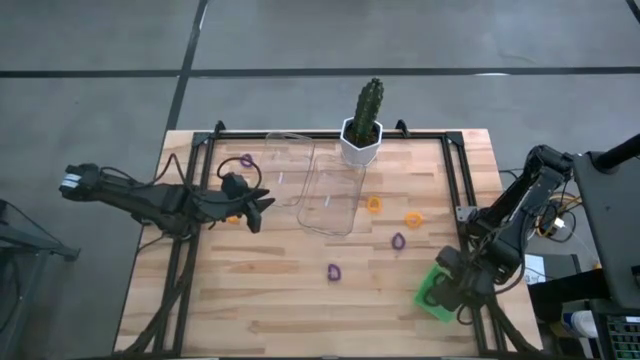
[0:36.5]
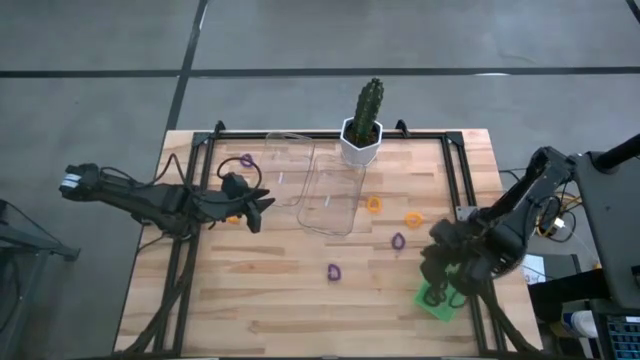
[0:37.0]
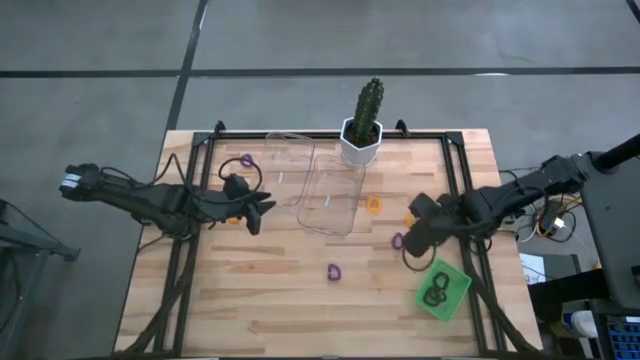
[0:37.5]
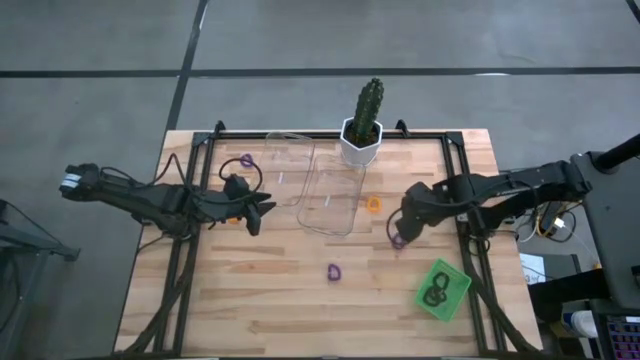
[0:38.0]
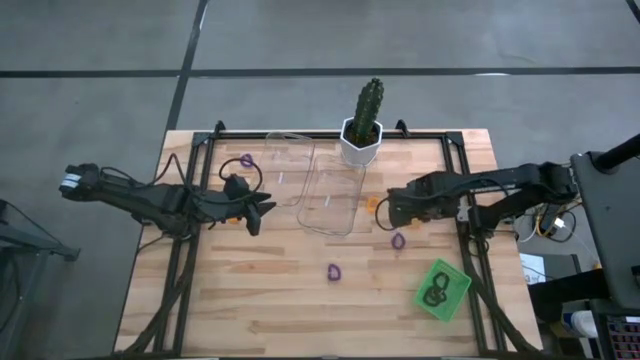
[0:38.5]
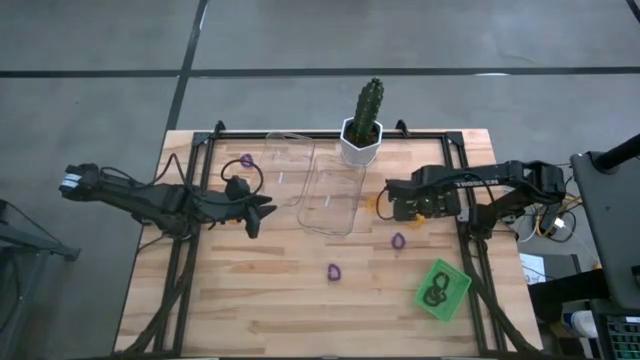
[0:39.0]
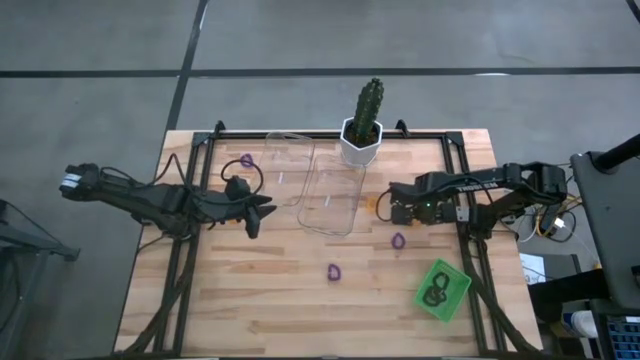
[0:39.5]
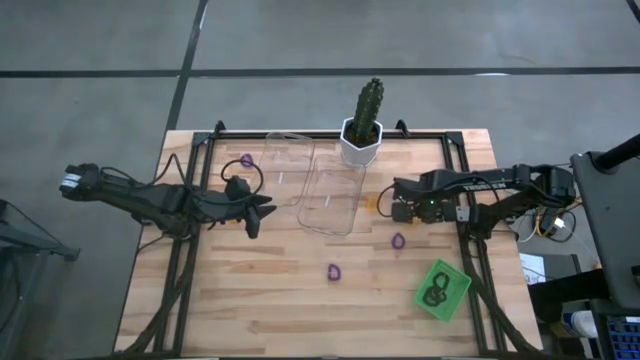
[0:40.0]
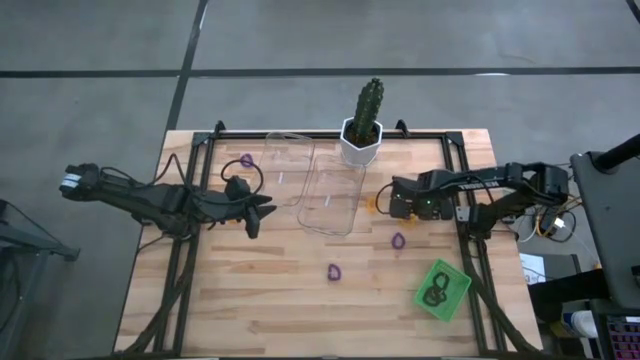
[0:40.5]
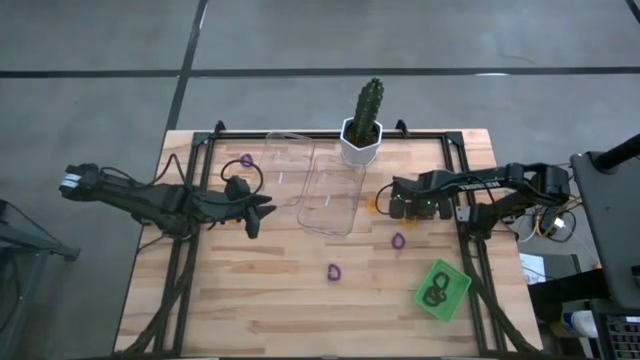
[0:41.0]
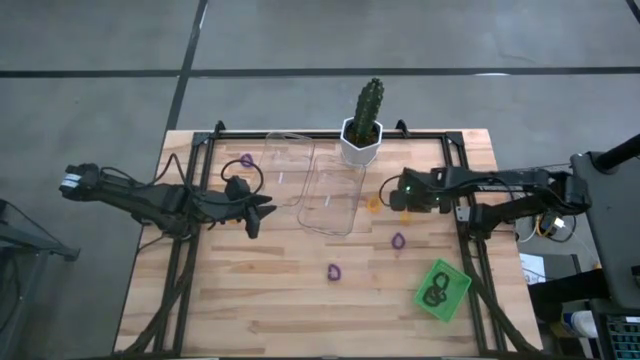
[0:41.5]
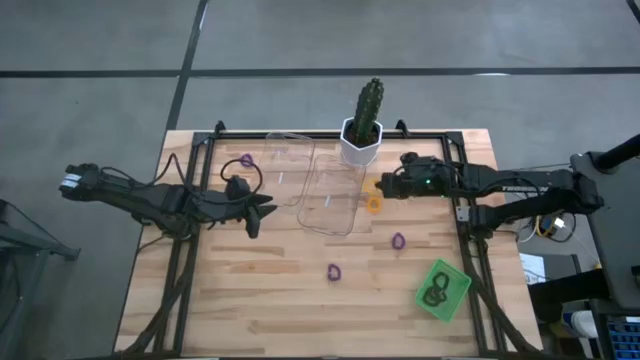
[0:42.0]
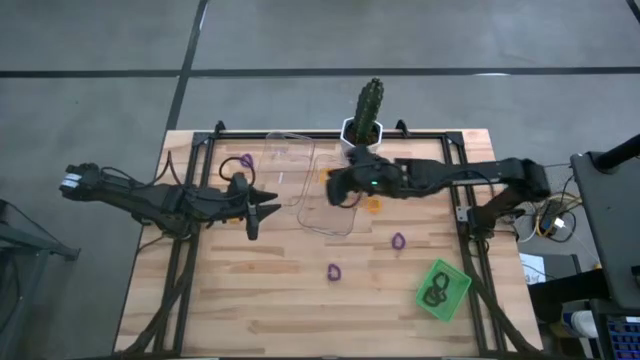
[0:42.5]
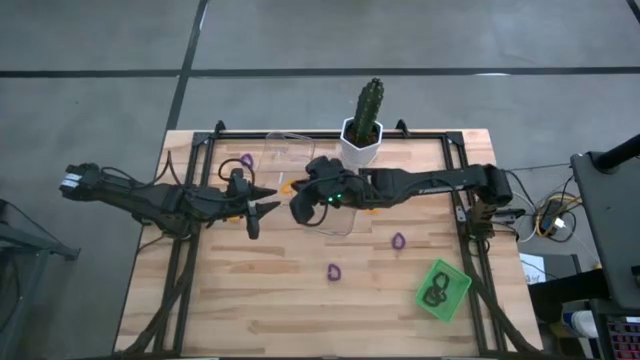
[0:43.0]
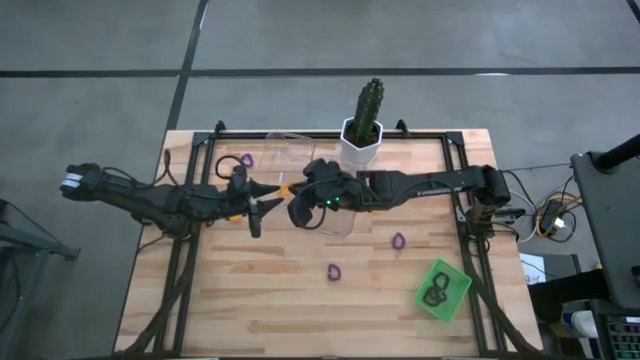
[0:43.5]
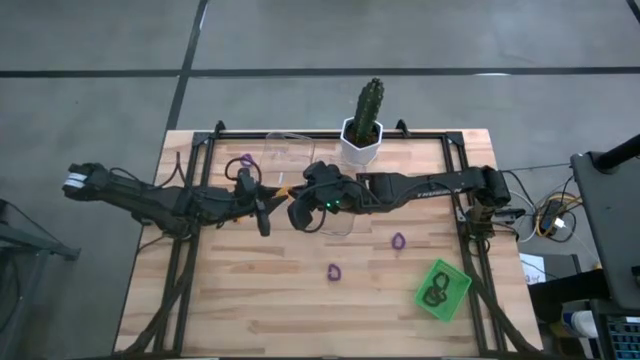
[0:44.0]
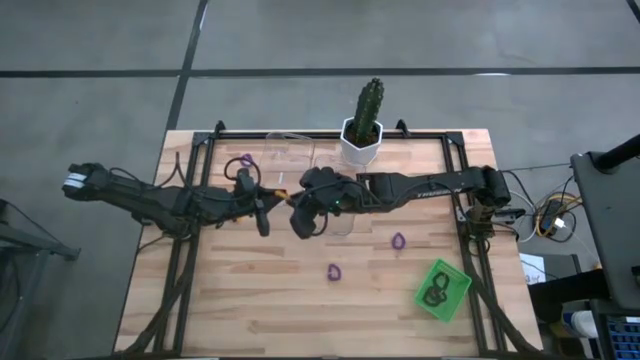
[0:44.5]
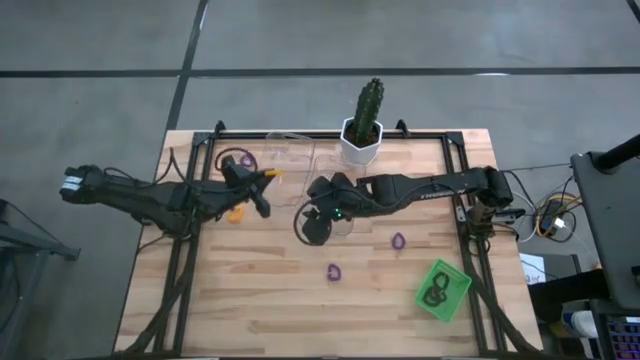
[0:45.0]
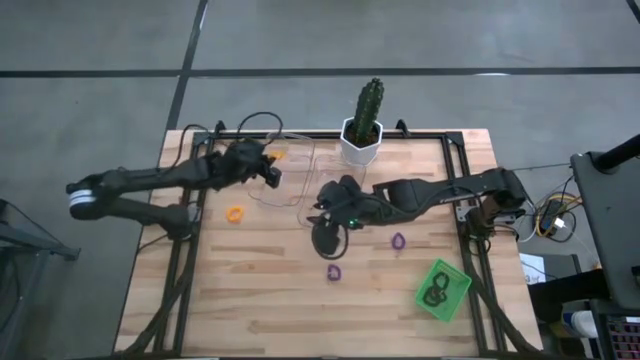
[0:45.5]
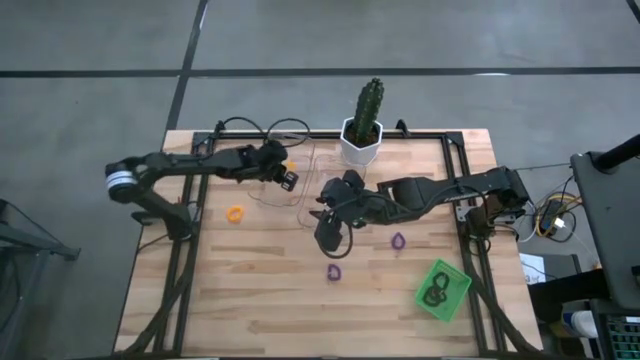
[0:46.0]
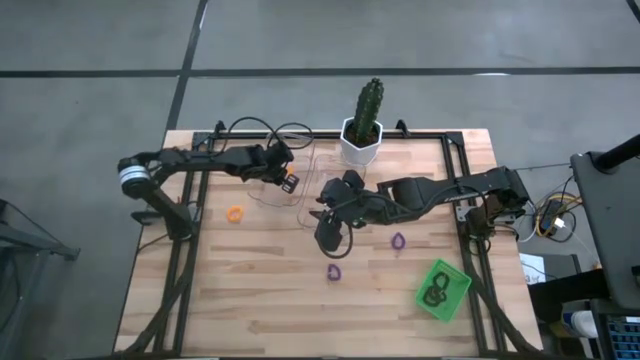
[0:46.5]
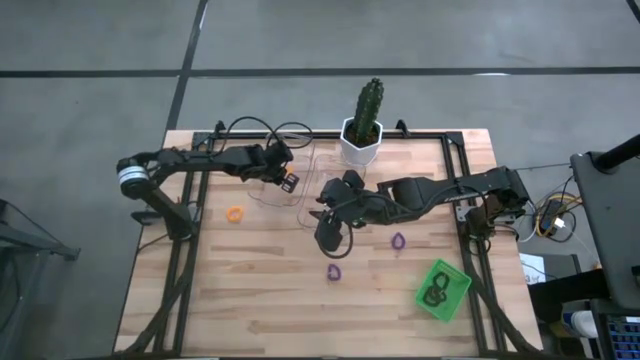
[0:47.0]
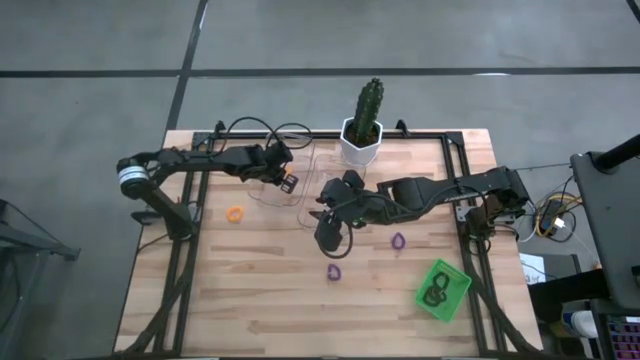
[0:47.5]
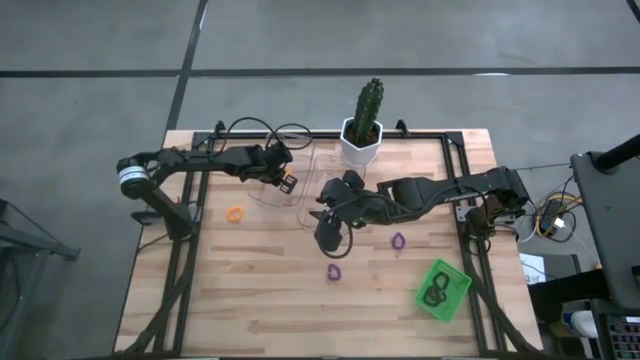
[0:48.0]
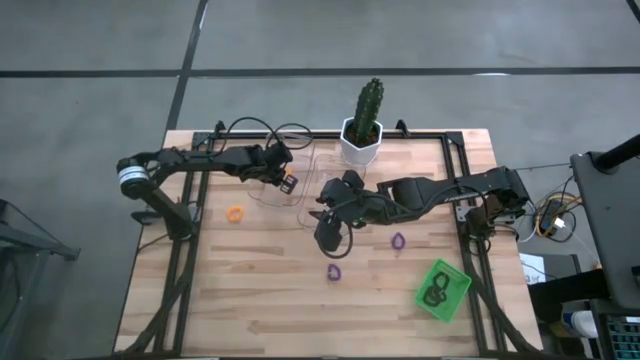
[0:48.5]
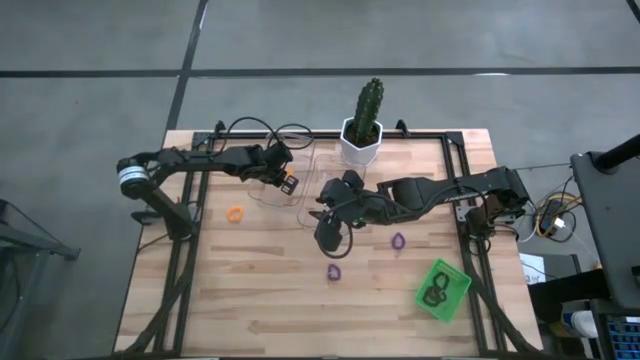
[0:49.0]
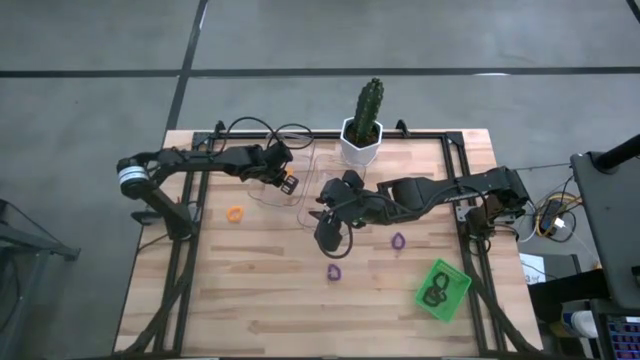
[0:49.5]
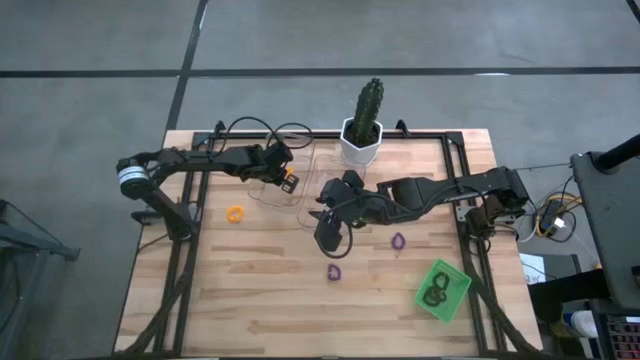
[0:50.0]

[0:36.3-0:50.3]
Task: Sort spring keychains
Put the right yellow spring keychain into the left transparent bin

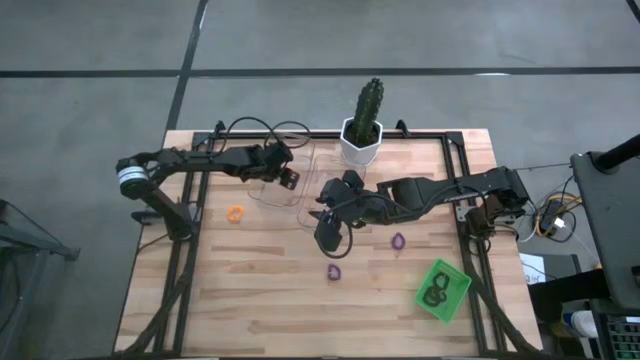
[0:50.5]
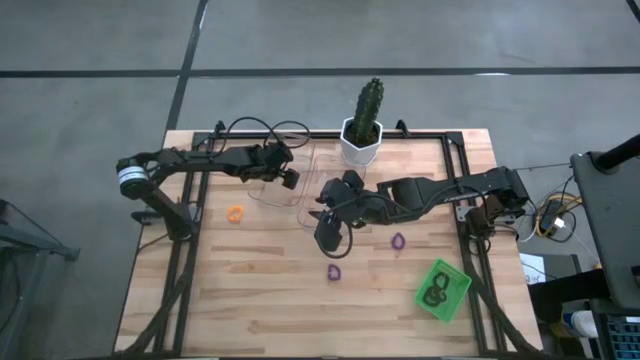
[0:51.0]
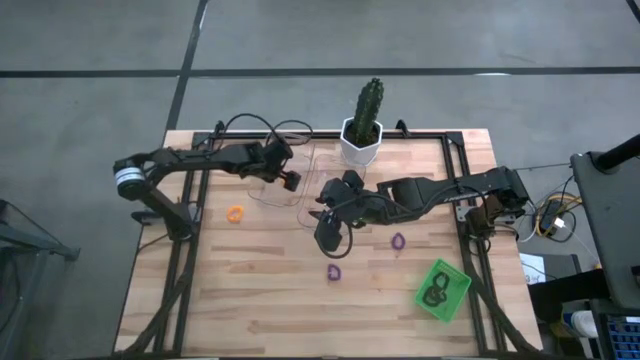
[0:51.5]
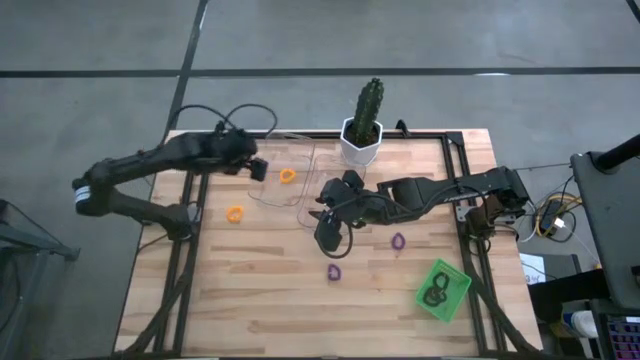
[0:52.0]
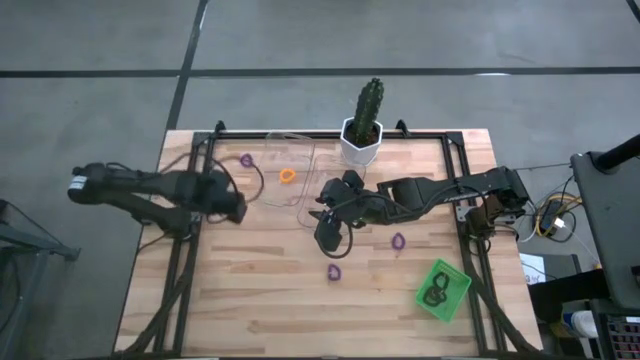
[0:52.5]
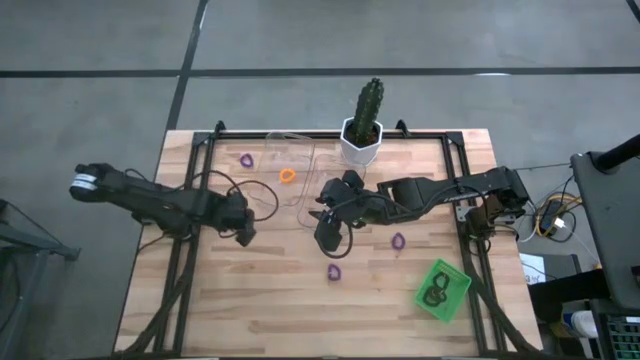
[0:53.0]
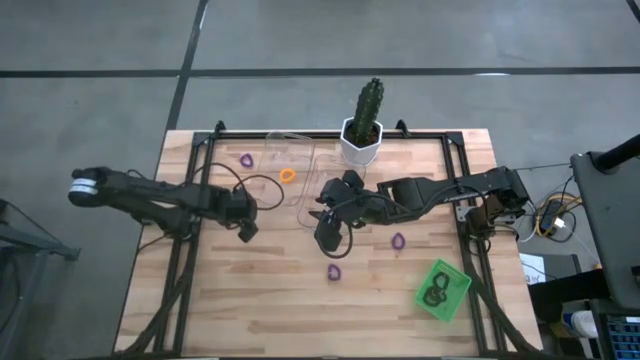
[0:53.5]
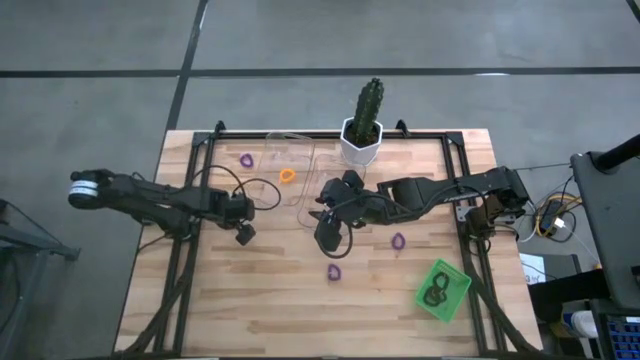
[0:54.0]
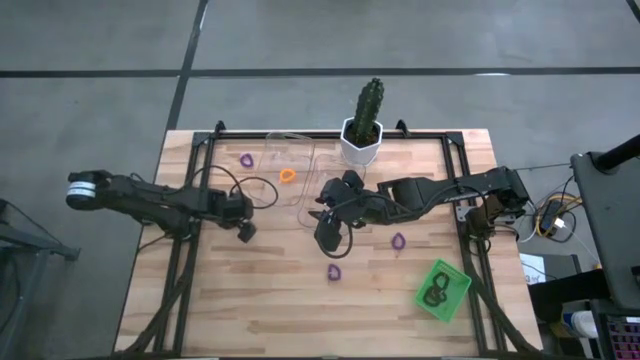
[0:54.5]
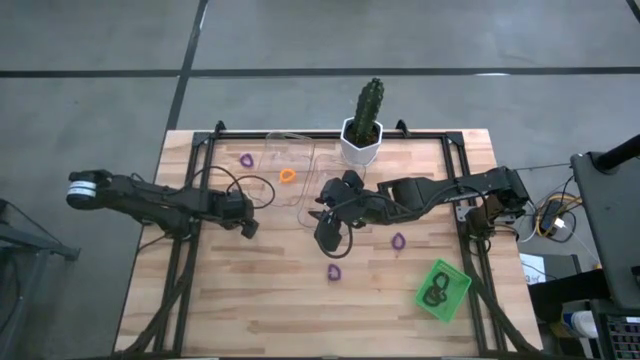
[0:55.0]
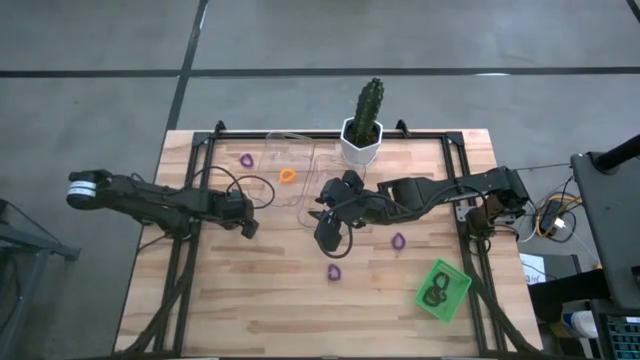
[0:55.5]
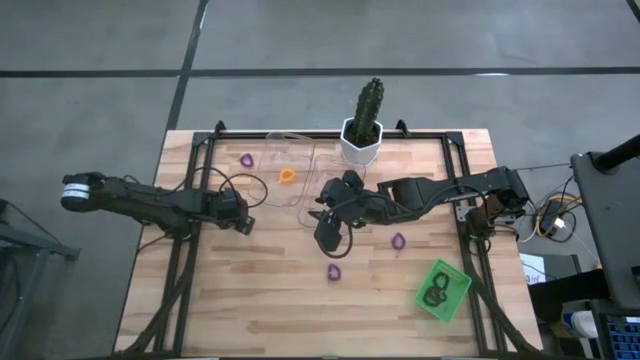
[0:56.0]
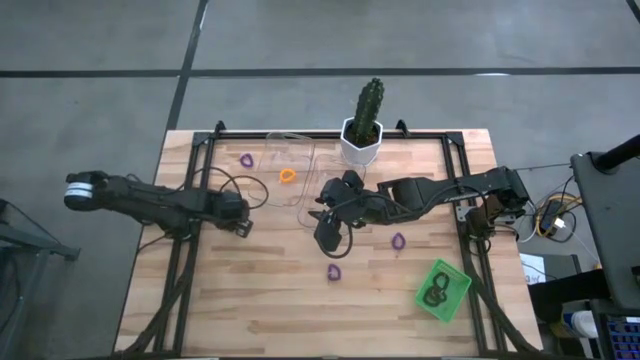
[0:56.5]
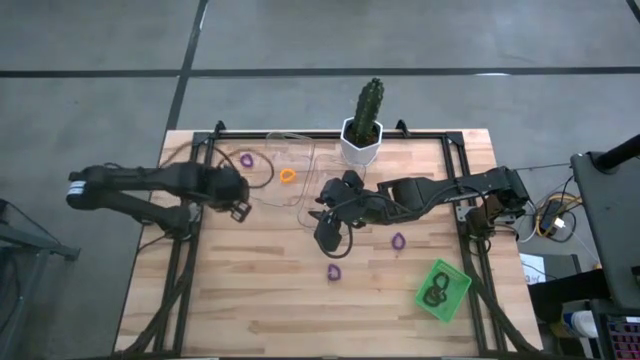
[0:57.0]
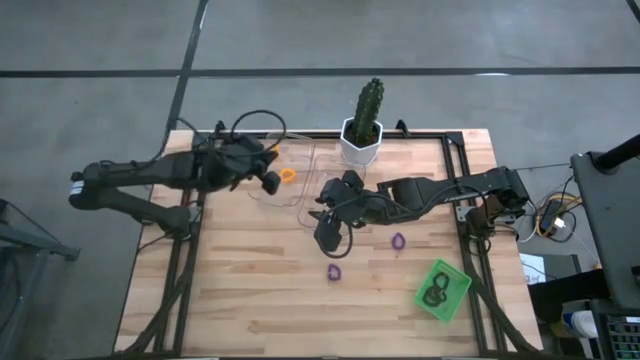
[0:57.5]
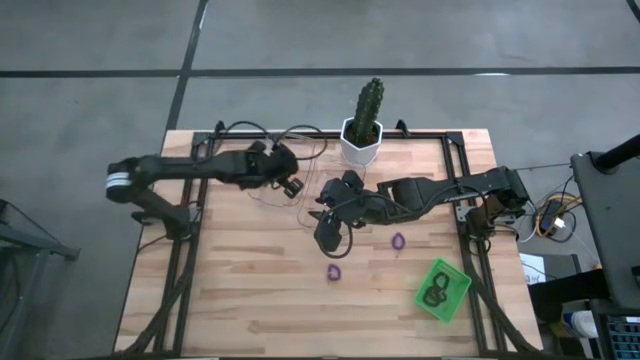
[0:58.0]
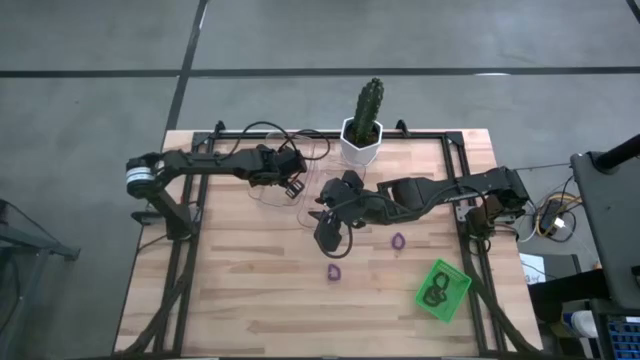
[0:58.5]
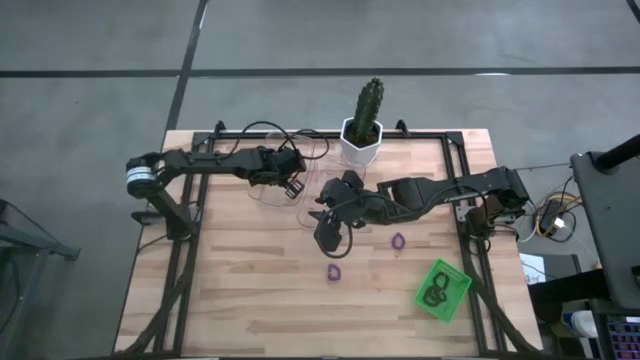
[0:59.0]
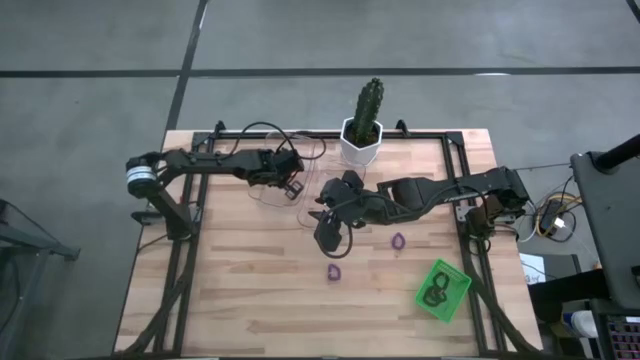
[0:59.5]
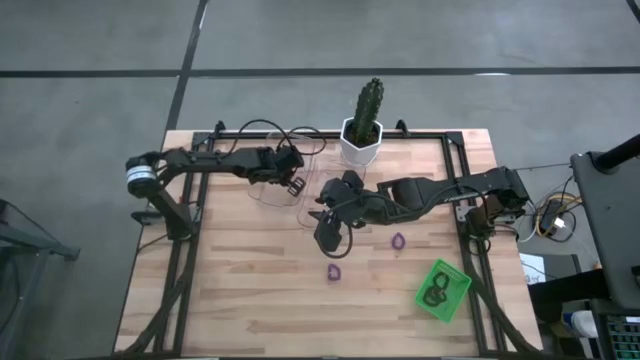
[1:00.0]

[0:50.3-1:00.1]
Put the left yellow spring keychain into the left transparent bin
